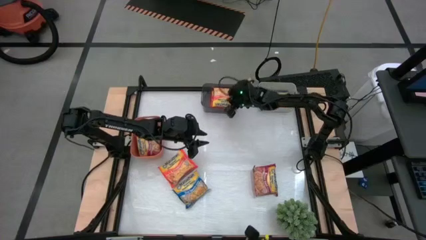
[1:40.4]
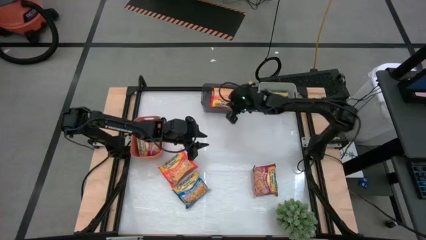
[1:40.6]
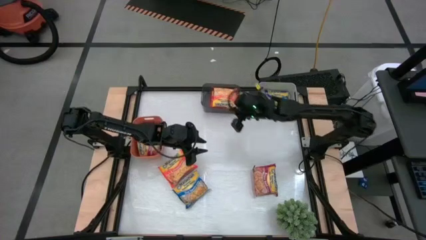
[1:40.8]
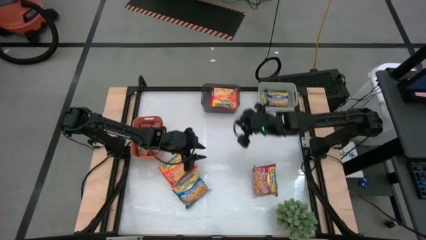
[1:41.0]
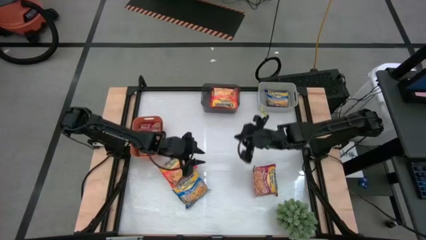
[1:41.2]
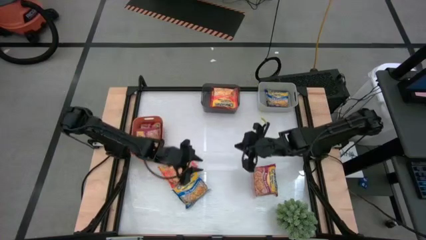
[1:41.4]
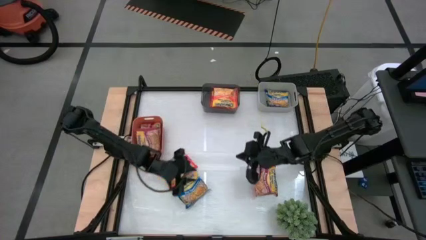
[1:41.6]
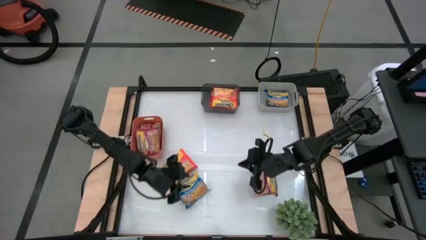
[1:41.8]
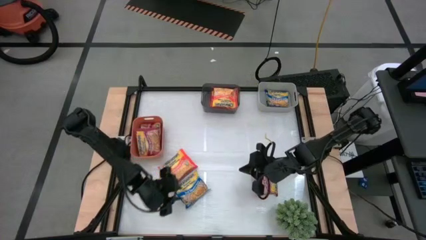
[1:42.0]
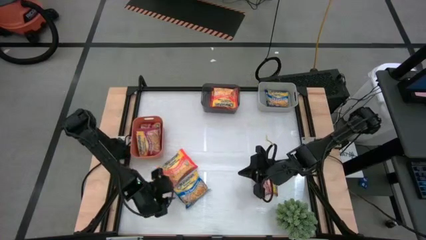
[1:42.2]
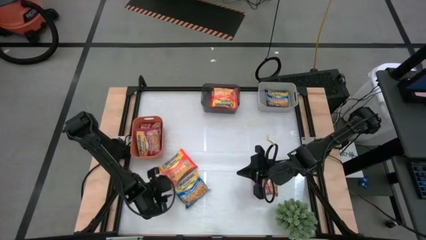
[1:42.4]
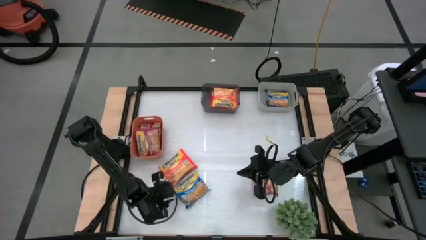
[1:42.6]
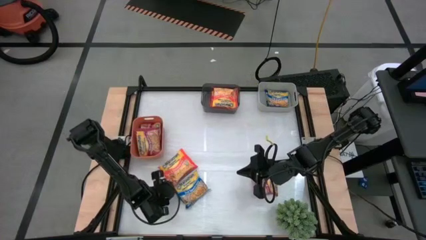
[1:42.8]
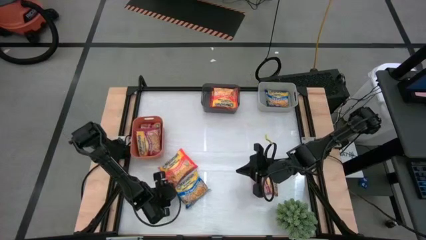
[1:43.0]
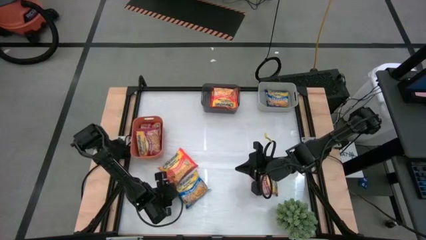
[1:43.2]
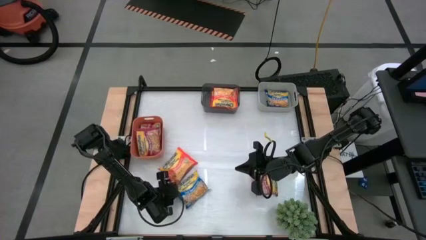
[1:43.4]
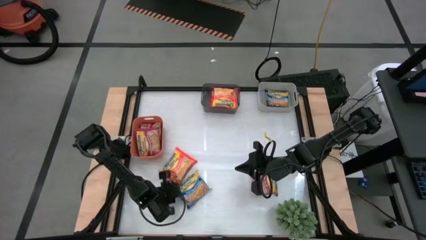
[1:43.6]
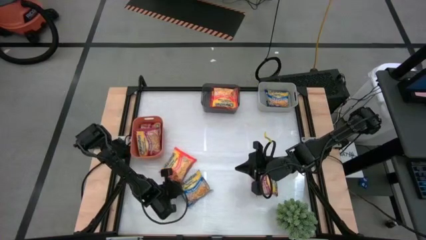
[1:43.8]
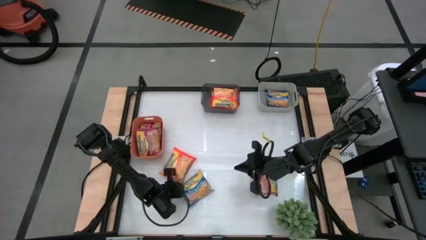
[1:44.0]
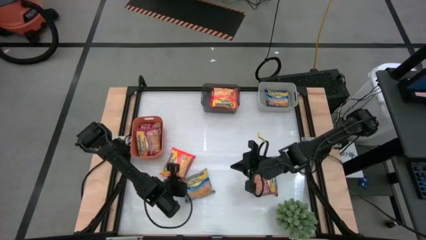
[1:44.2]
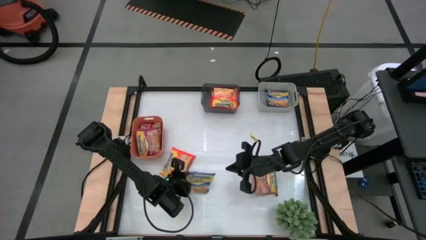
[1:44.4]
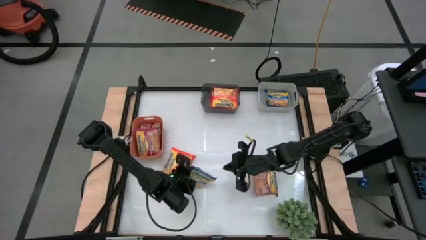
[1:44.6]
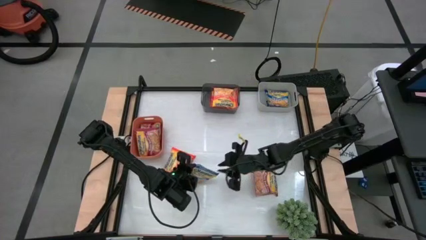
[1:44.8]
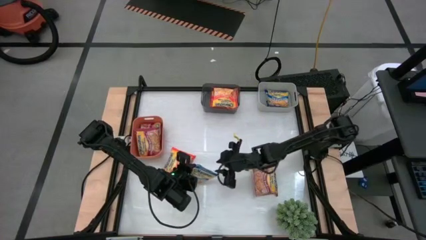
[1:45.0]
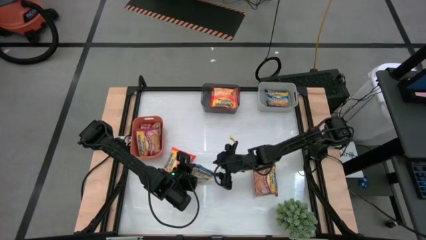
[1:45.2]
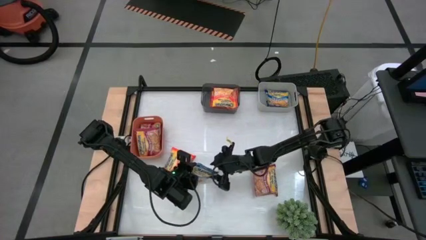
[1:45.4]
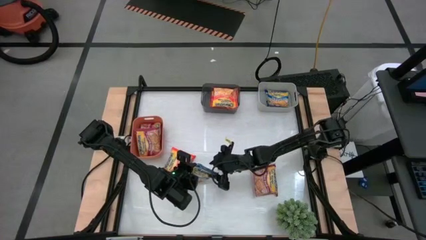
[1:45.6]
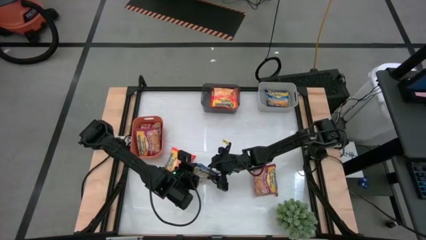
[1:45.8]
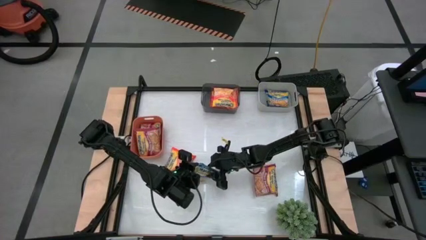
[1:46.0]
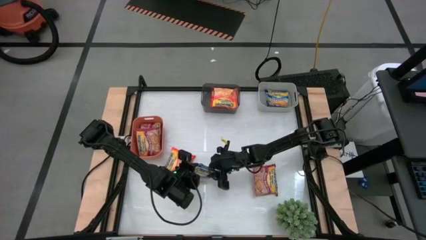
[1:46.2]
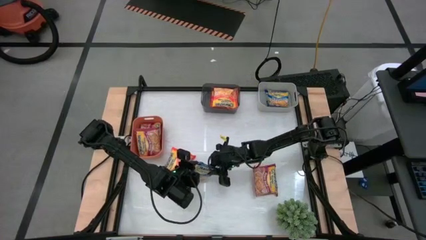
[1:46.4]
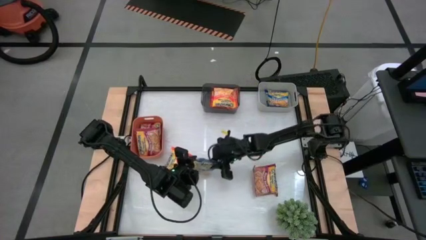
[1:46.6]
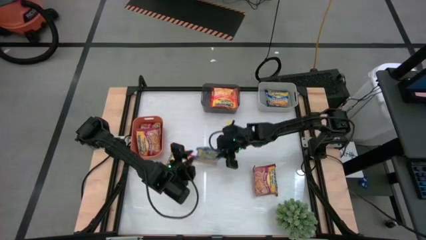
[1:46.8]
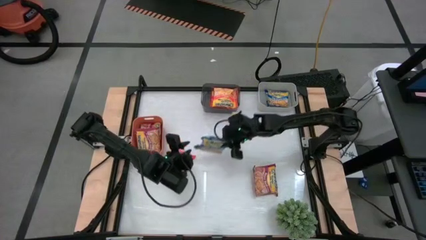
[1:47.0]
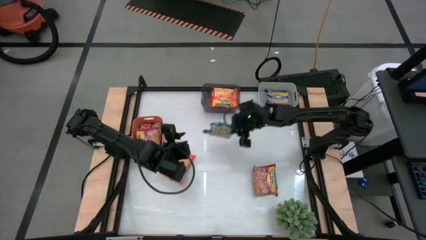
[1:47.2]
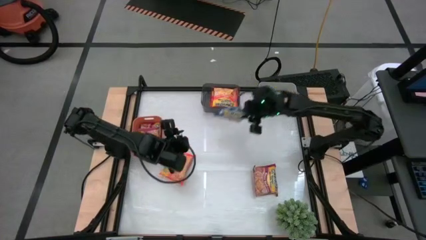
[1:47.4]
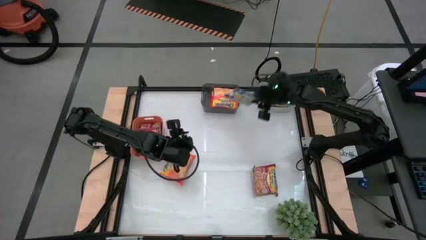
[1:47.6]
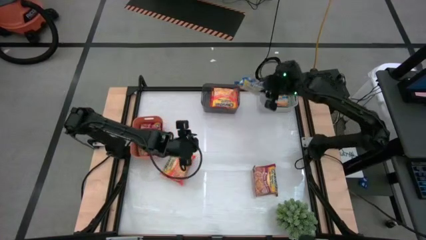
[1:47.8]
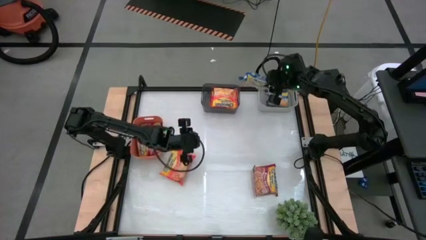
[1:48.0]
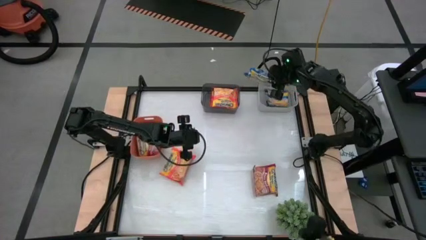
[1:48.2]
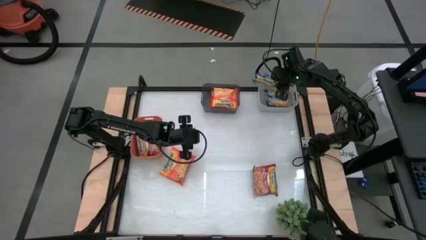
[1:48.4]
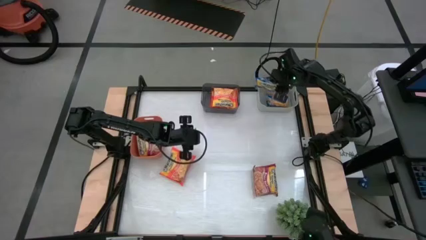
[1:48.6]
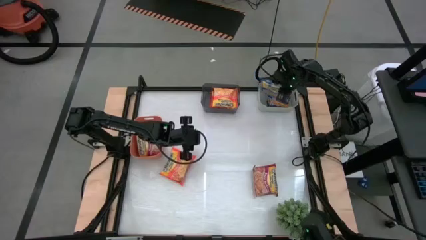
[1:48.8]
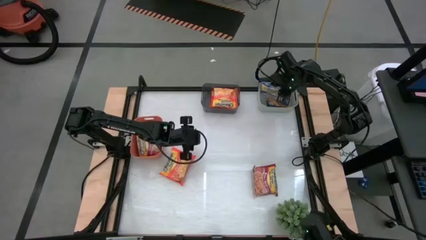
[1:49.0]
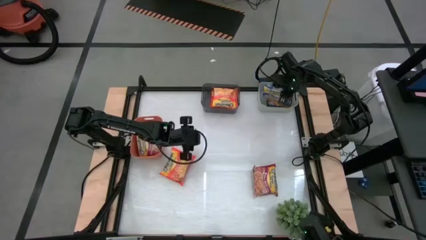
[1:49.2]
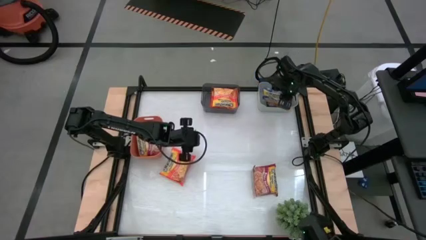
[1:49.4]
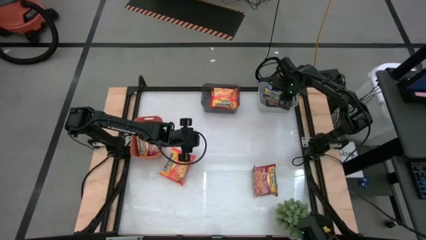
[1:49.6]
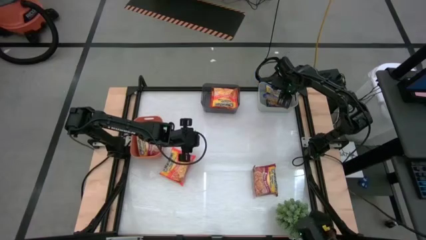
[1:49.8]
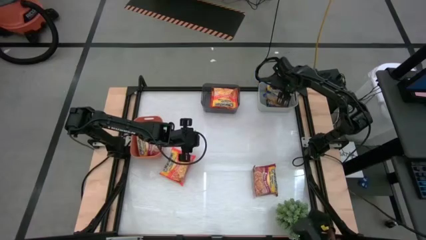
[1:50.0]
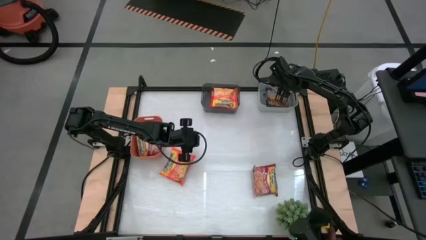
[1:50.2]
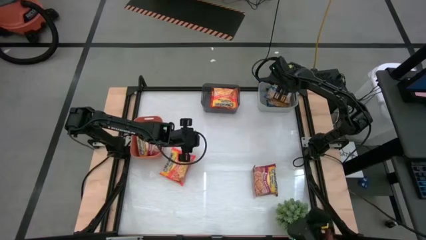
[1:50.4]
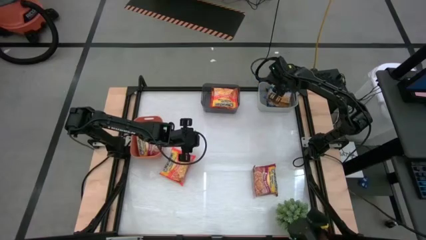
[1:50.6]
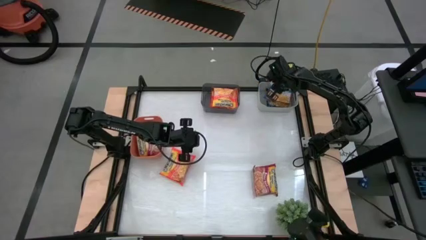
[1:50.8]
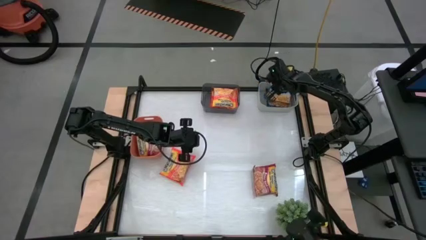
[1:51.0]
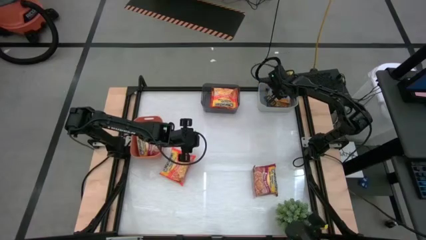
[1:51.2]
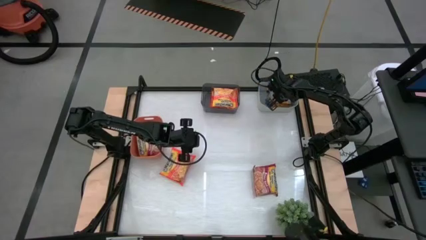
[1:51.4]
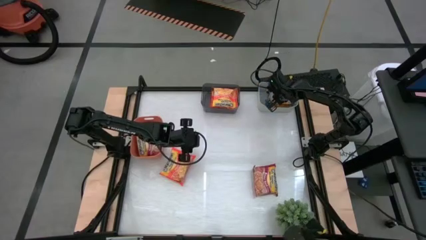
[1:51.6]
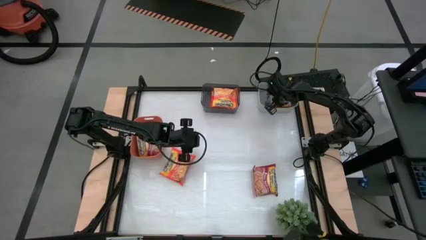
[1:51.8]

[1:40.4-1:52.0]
Task: Sort Maruchan noodles
Put the blue noodle pack into the gray bin

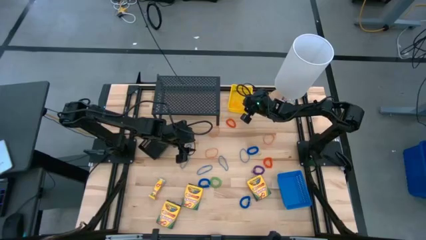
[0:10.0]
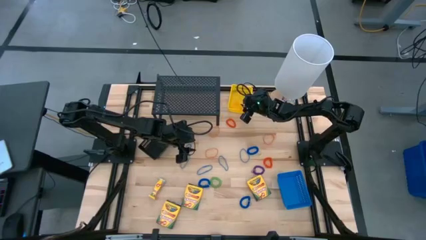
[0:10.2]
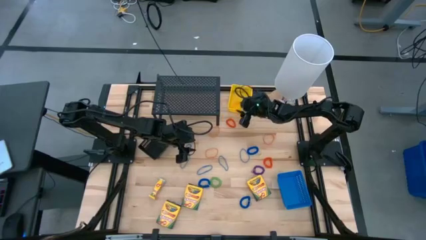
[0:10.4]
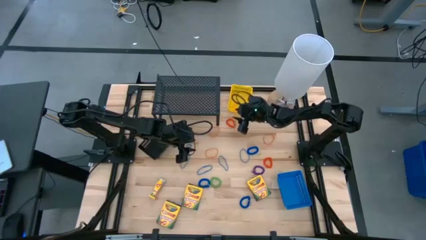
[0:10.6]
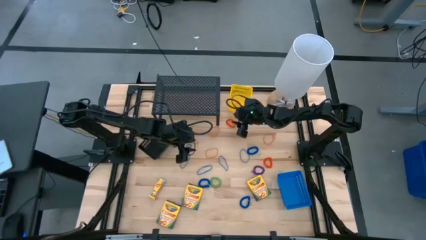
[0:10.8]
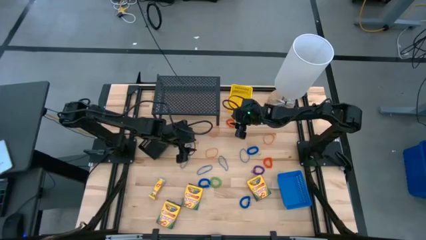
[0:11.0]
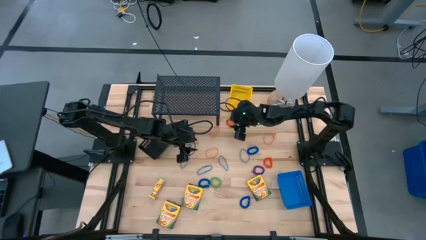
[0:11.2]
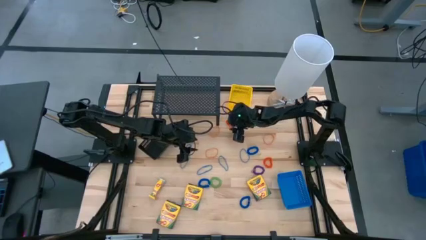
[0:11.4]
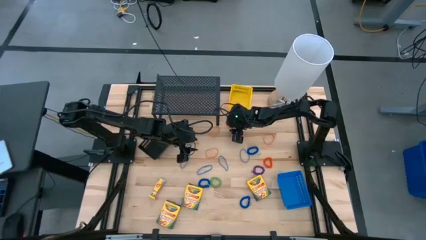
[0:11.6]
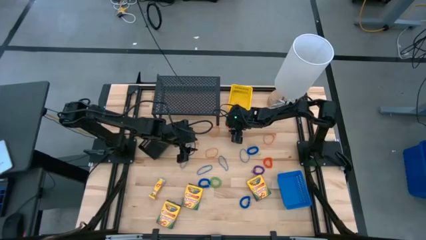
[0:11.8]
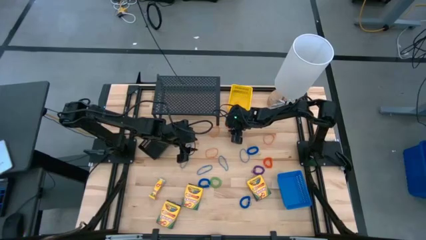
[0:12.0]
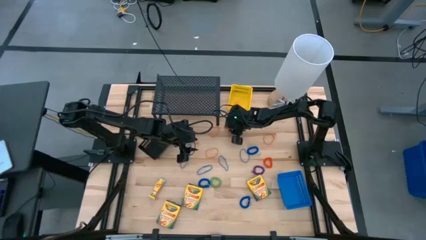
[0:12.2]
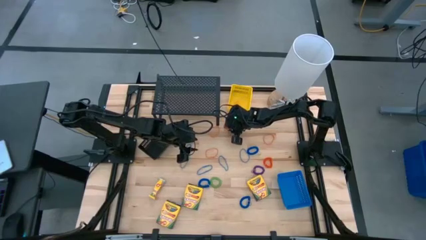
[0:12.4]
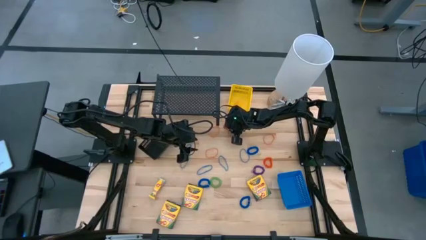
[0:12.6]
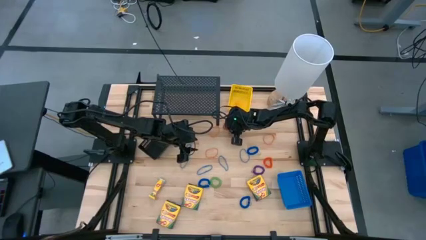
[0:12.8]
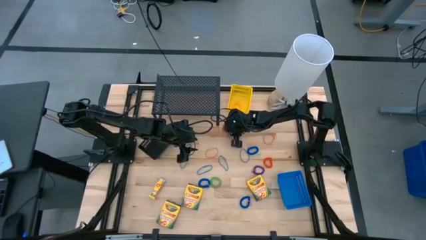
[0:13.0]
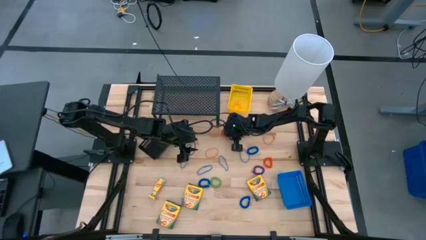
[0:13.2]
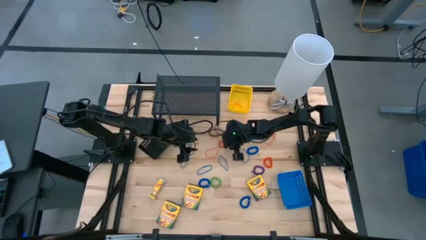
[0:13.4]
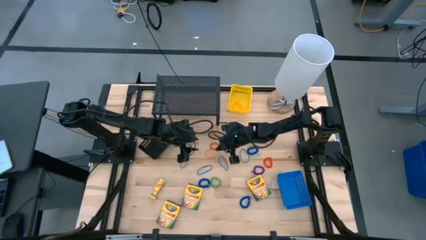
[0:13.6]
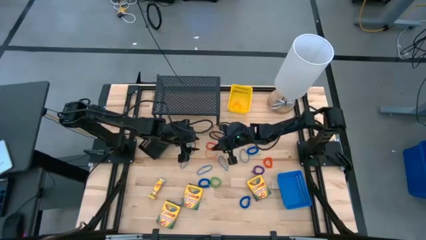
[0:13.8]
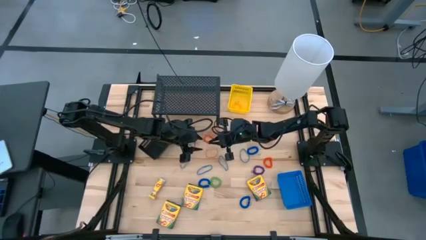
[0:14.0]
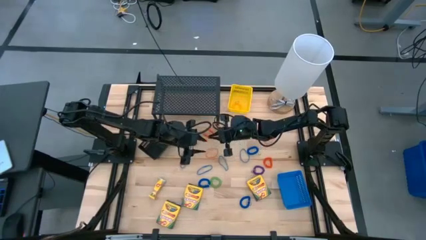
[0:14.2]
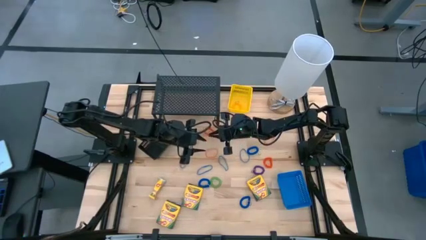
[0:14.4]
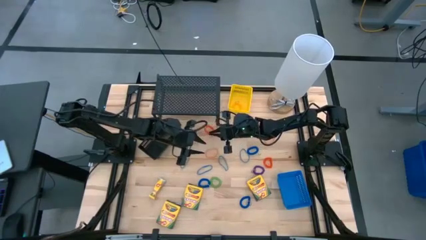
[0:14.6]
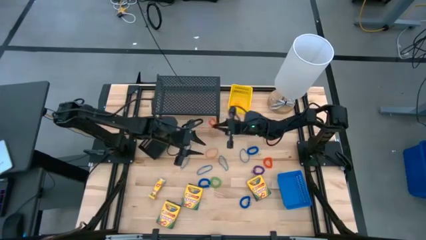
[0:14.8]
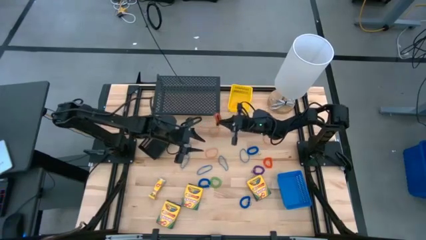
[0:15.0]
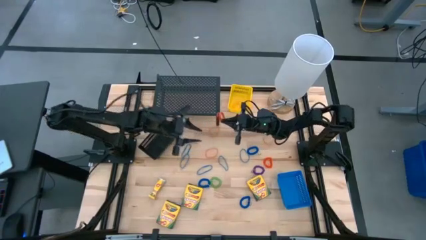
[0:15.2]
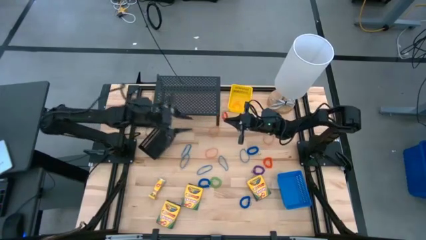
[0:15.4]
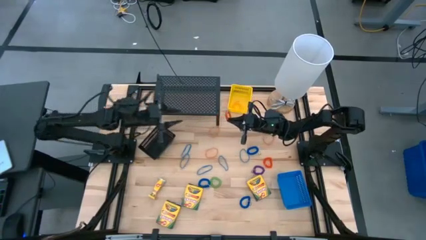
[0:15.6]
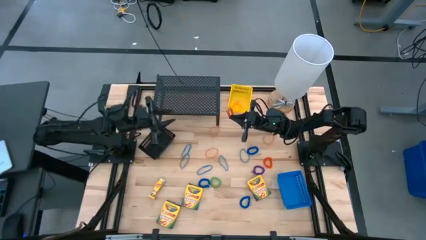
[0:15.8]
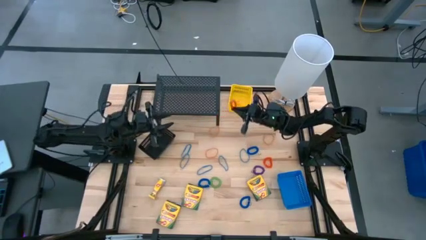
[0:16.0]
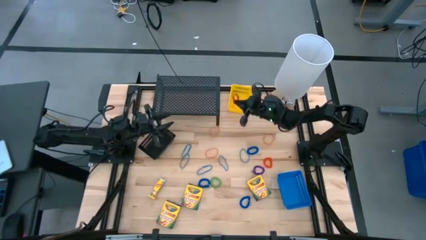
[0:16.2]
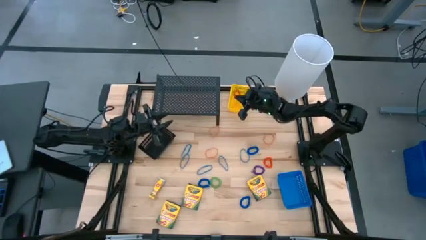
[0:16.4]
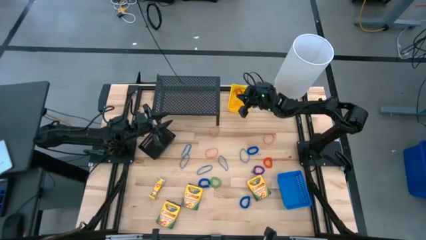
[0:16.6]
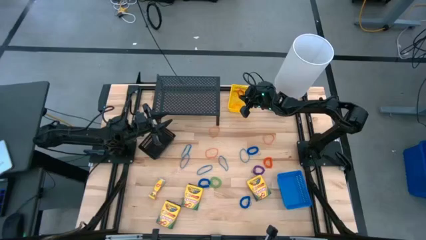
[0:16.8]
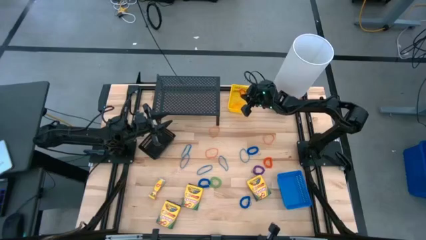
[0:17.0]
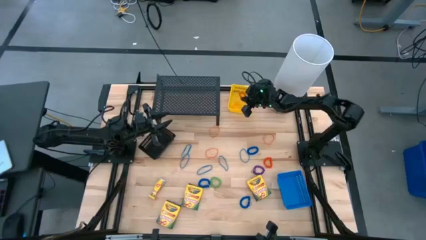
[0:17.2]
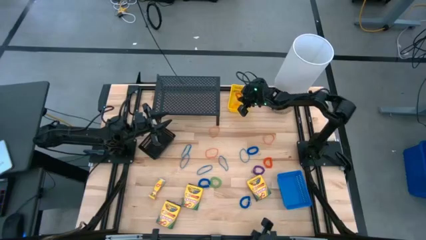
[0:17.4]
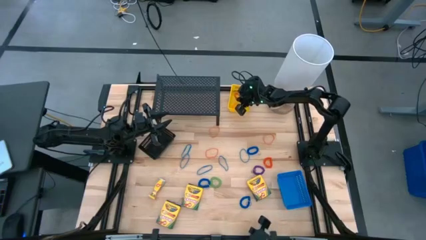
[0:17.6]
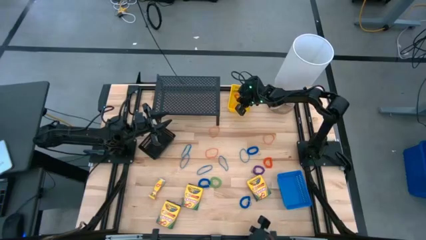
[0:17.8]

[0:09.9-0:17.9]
Task: Pick & Place Office Desk Supplies
Put the top orange spring keychain into the yellow bin
